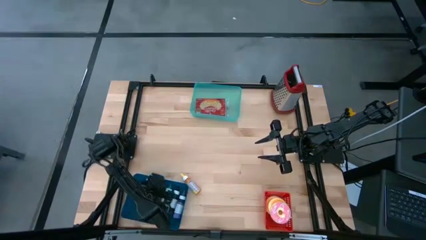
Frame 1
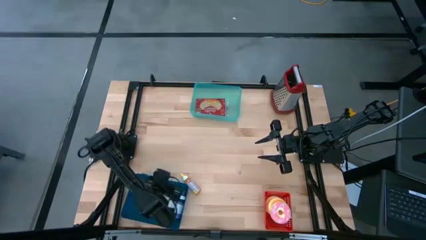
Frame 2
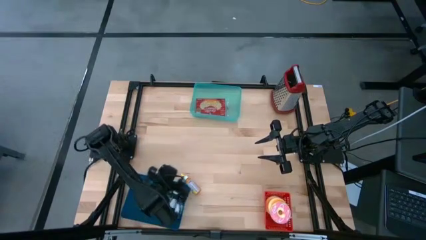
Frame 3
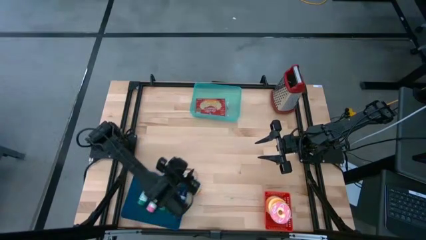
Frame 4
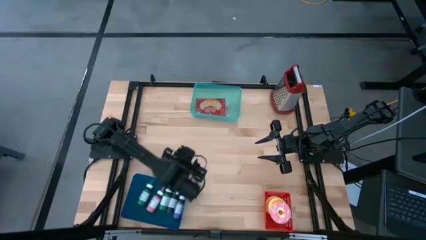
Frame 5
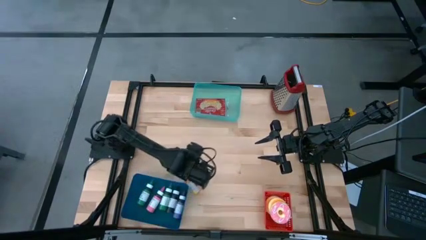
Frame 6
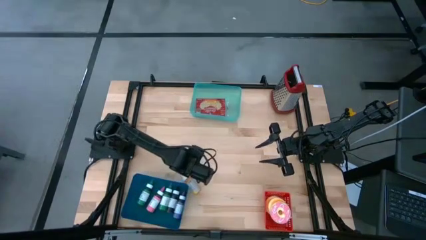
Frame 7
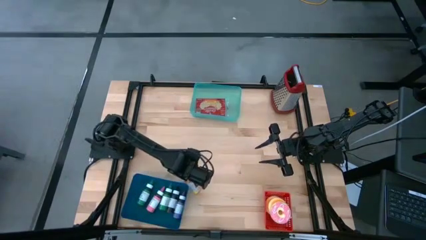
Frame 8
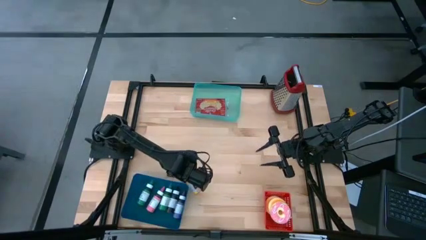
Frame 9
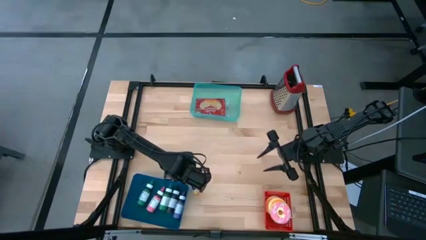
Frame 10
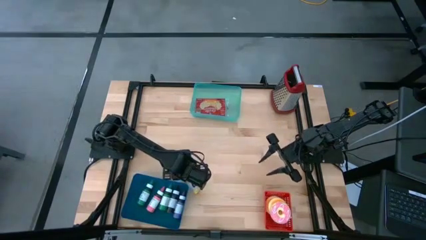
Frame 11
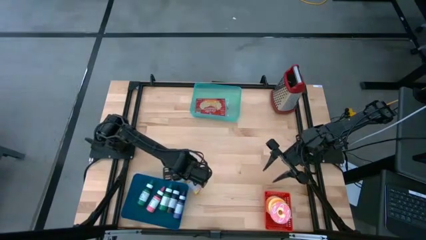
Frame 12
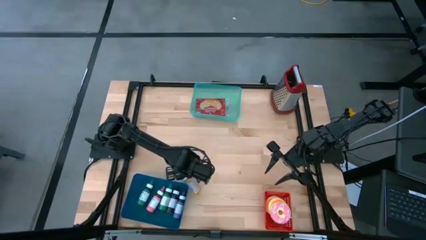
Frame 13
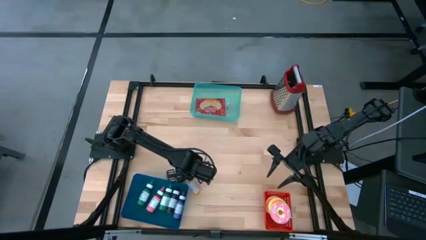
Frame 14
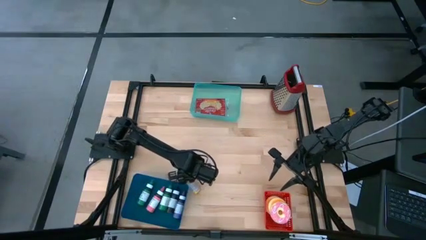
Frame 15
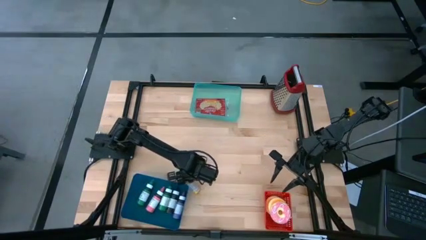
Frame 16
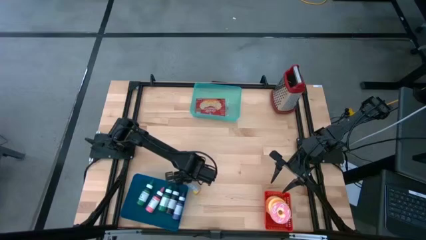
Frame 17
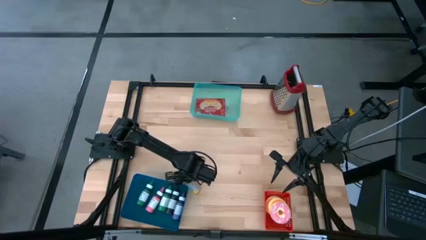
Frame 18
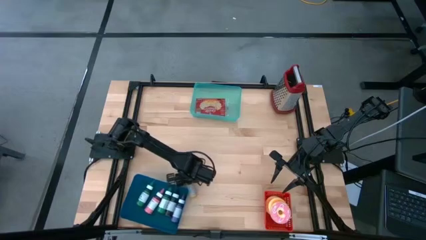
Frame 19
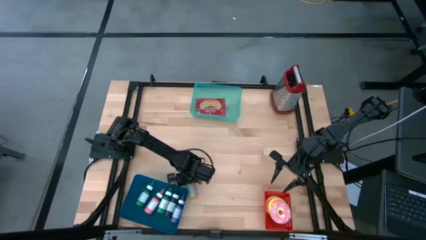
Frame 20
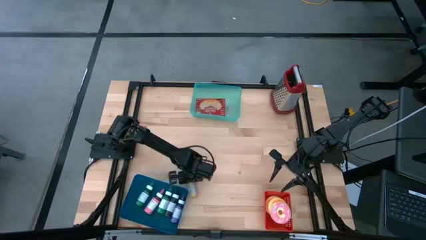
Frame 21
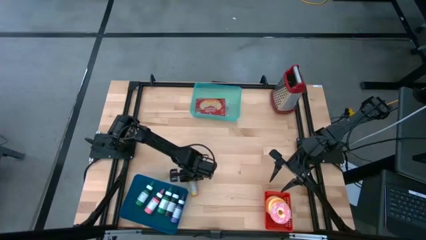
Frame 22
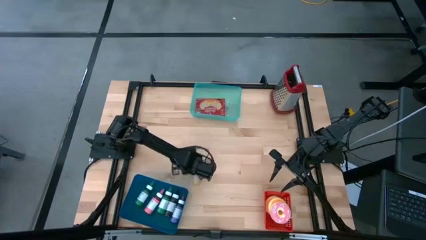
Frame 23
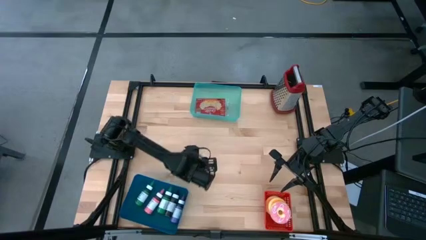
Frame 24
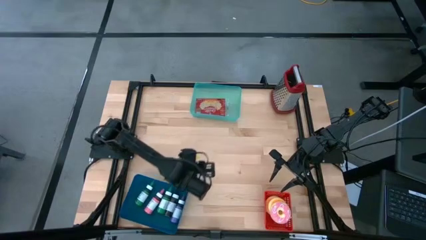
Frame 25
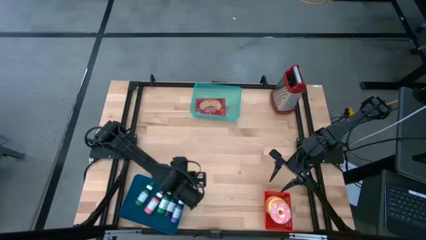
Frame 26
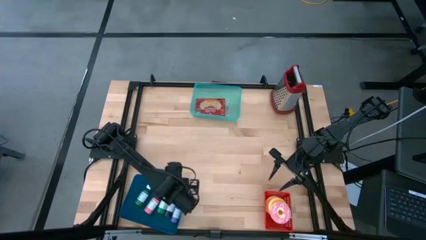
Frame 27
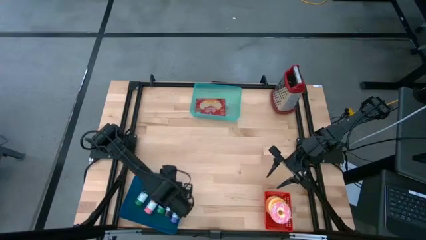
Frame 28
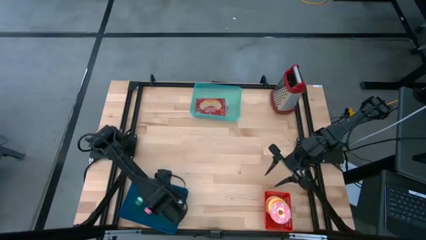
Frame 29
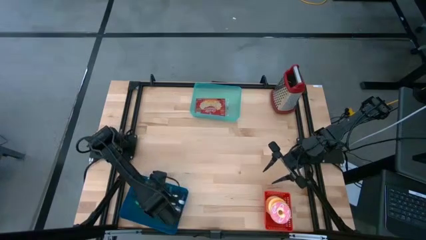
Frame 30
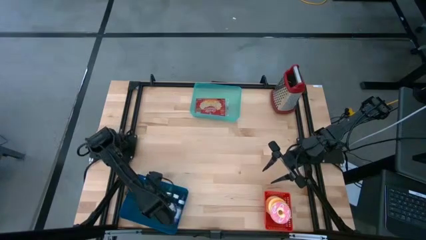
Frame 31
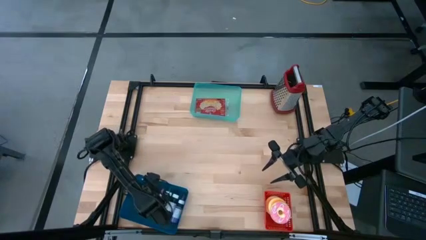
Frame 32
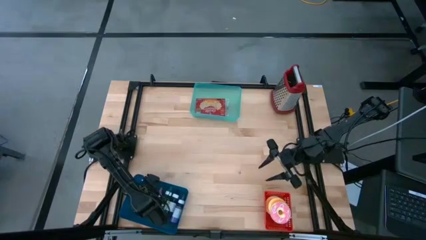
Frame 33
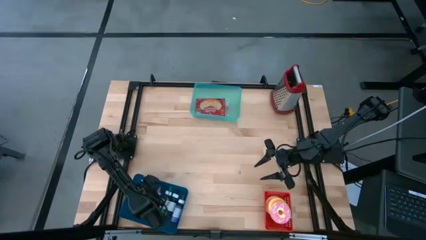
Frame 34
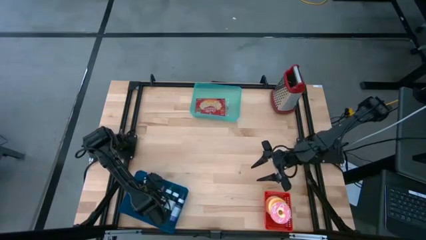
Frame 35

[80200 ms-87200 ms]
Put the yellow food coloring bottle into the dark blue bin

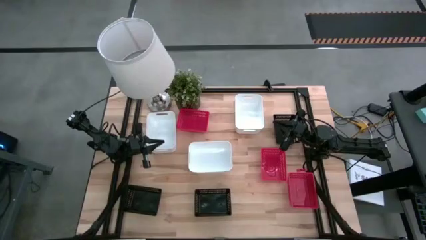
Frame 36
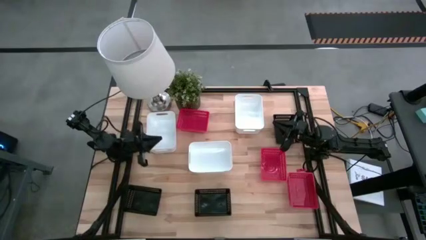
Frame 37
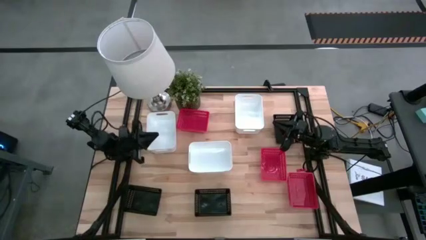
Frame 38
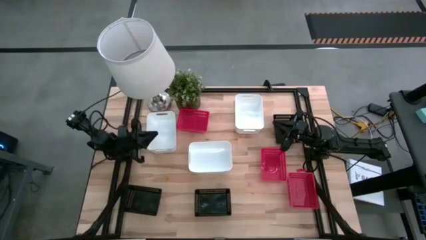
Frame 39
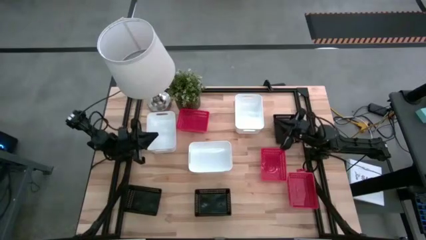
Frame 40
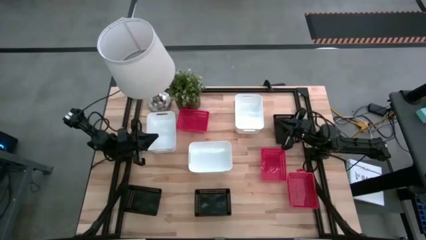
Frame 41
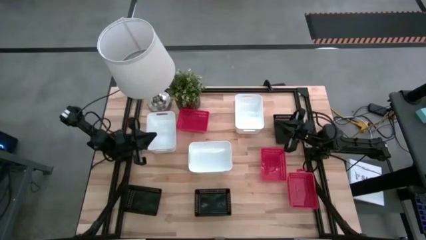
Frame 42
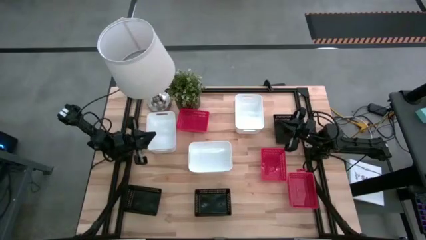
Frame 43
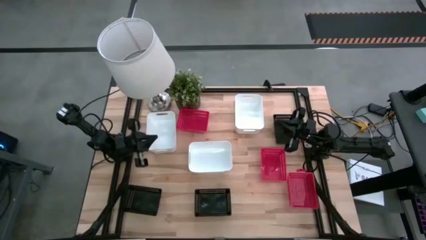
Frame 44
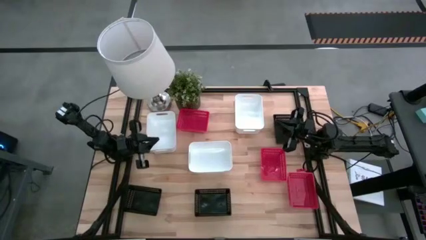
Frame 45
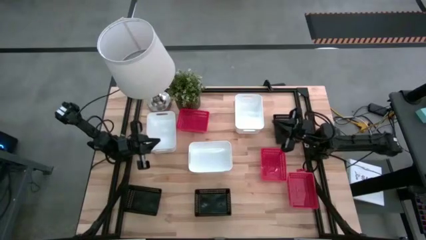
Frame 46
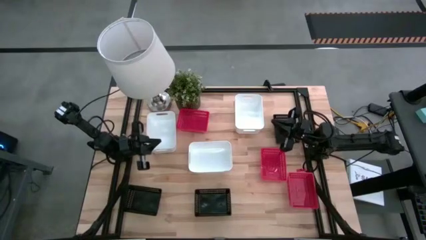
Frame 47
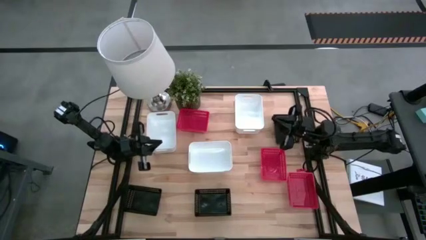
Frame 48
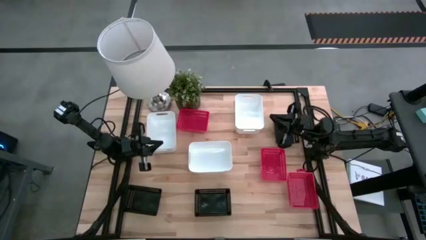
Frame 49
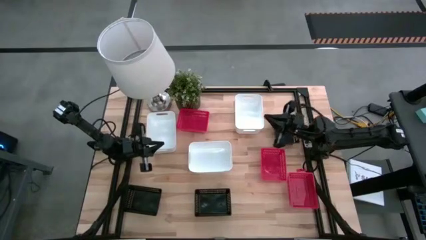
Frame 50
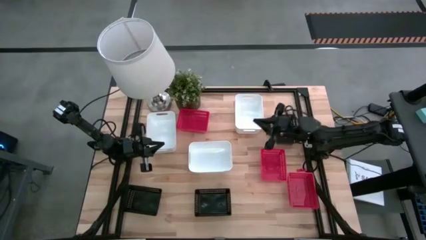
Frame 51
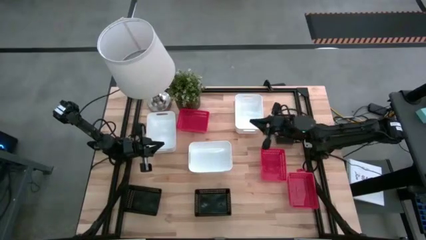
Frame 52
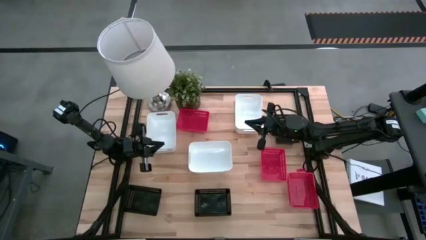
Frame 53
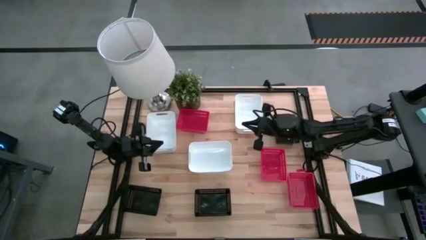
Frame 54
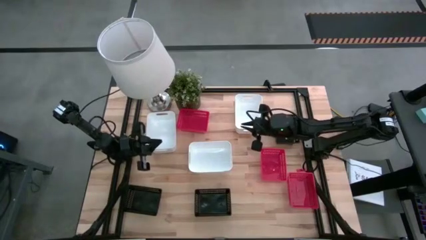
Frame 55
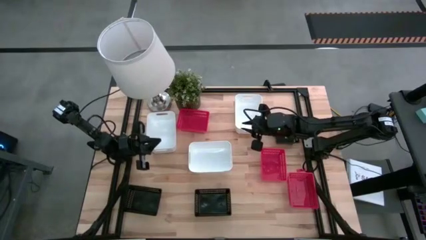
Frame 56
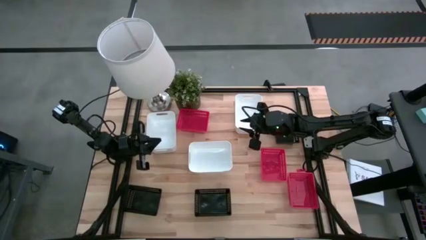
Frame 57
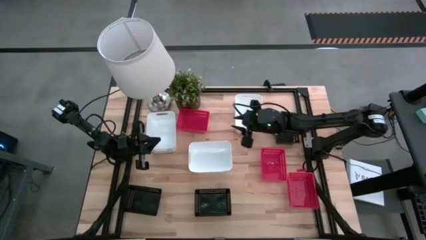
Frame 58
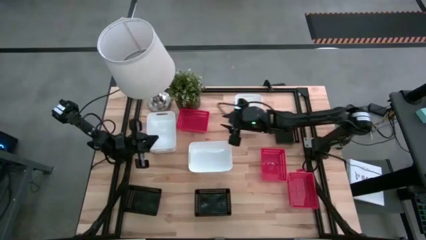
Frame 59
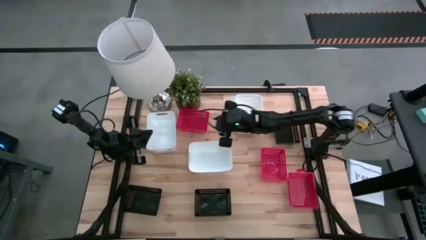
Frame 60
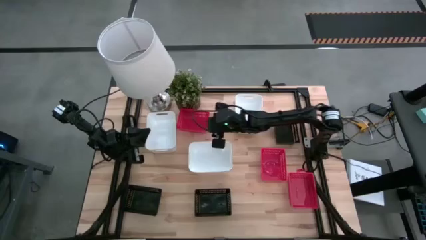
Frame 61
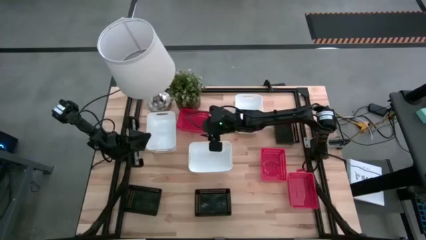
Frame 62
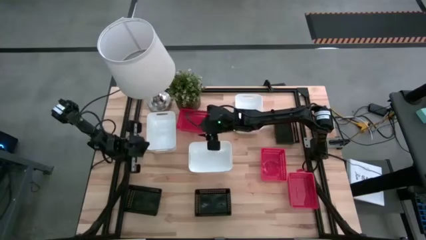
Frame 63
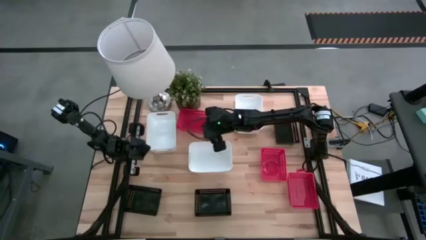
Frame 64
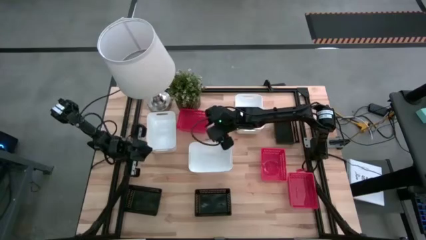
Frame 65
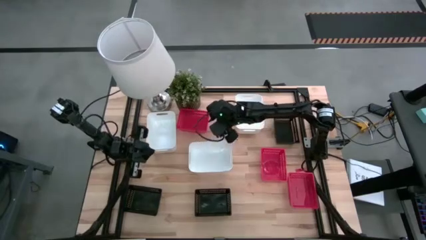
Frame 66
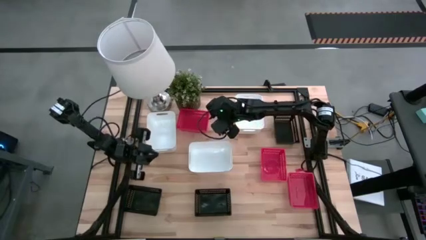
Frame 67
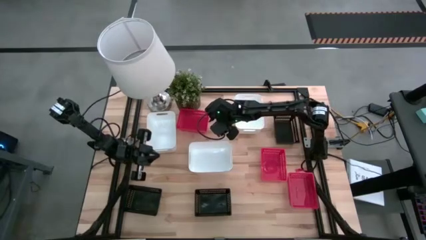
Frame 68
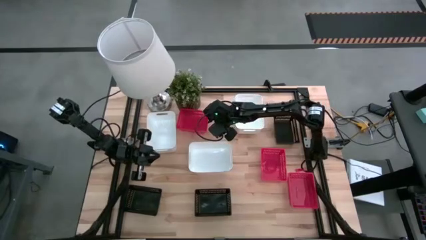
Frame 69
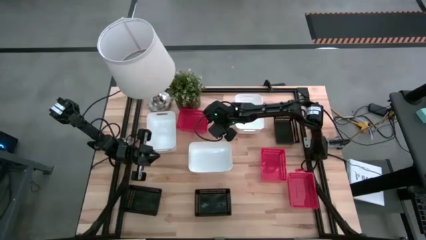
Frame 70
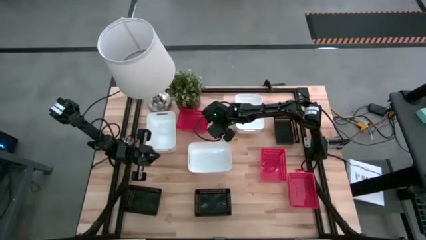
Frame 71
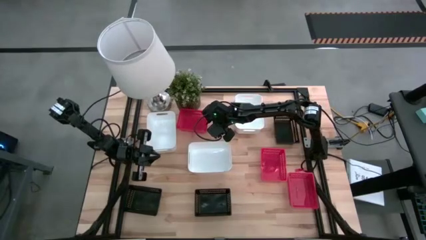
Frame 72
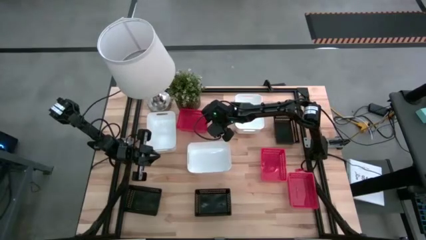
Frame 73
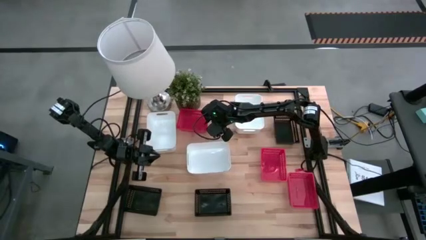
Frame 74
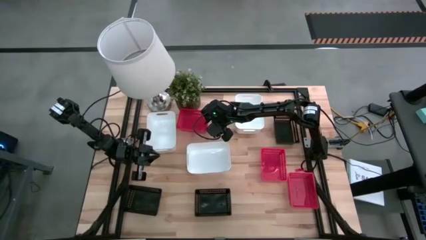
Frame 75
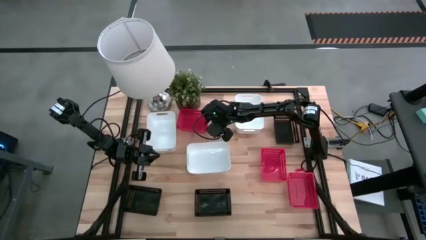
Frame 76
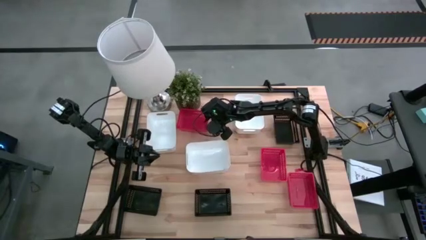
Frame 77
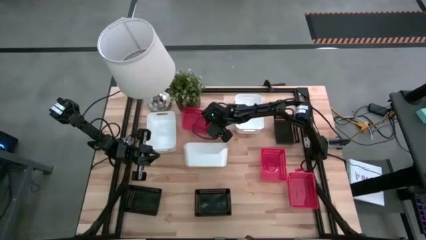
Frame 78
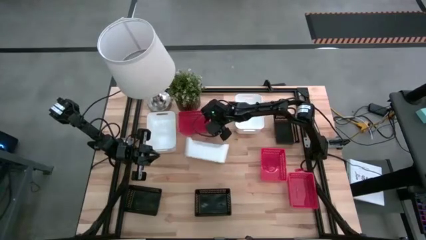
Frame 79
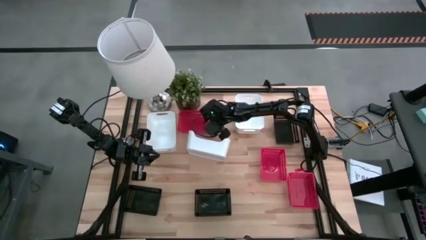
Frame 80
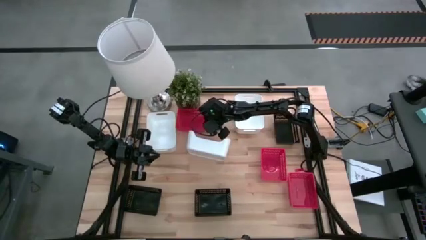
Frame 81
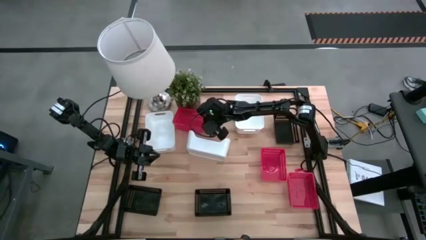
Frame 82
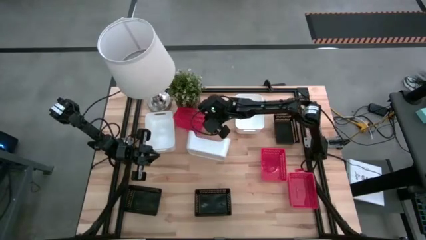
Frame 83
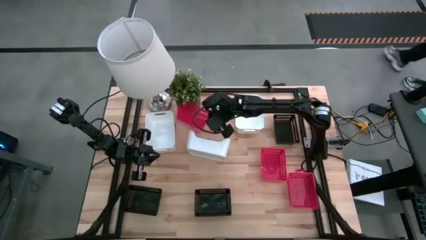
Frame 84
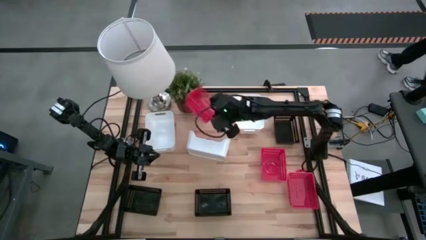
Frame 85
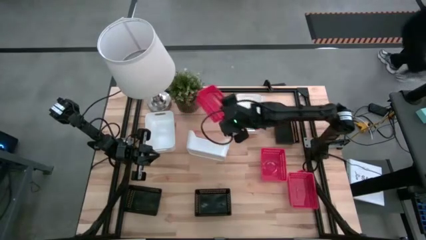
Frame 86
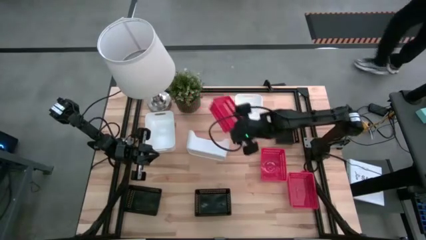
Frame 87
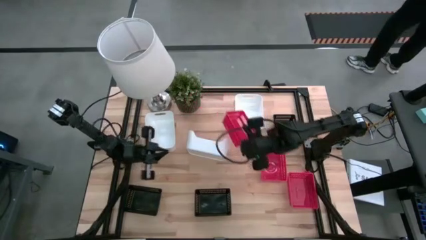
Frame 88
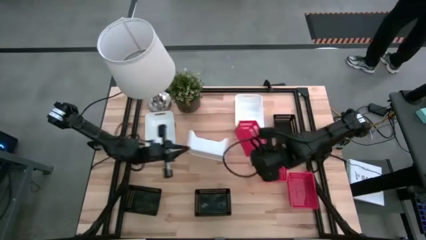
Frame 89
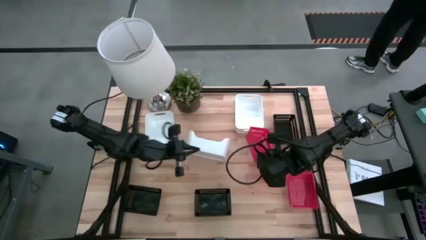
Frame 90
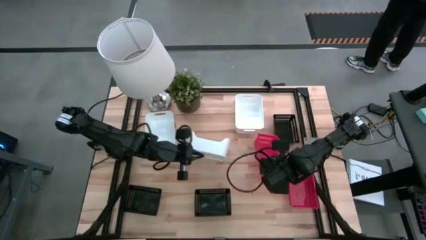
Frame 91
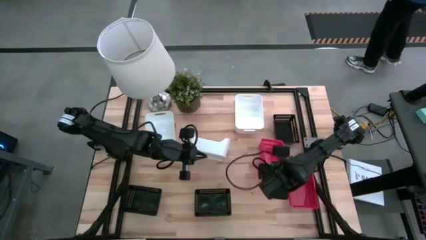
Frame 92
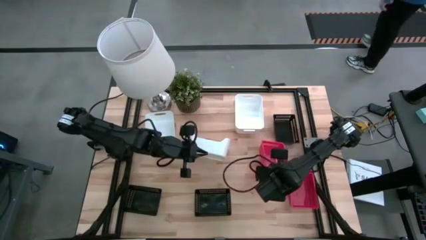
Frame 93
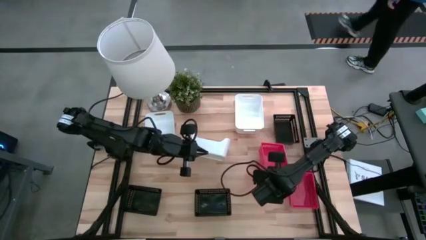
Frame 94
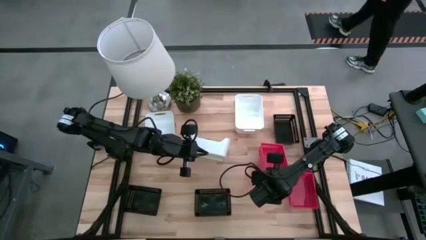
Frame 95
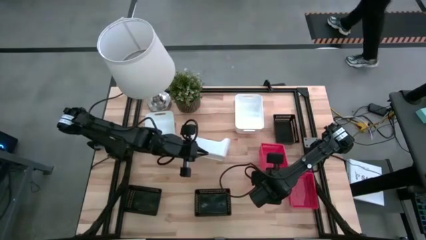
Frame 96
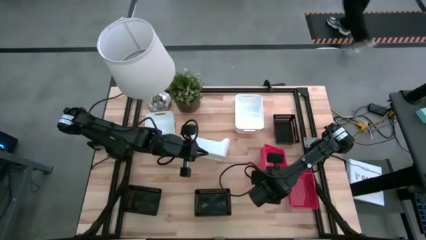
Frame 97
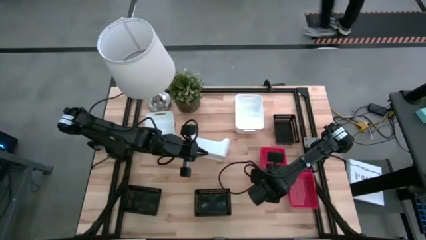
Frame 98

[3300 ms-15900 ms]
Stack the top red bin on the middle red bin
